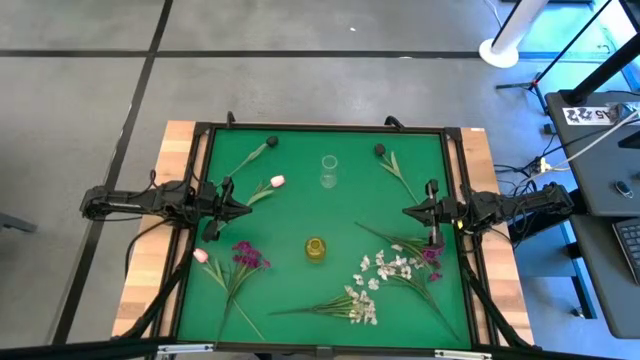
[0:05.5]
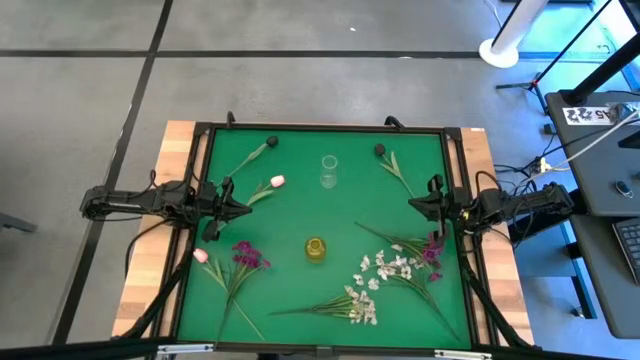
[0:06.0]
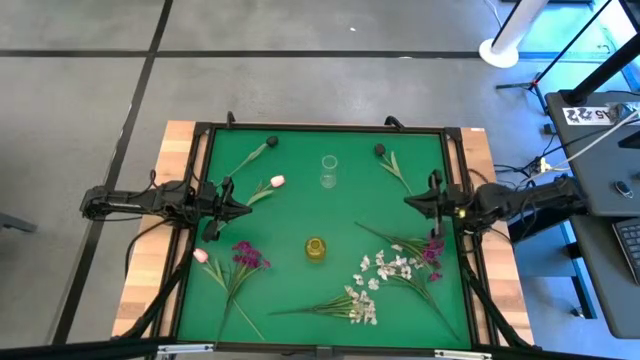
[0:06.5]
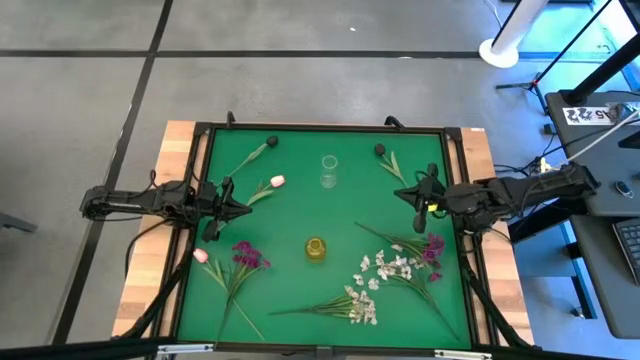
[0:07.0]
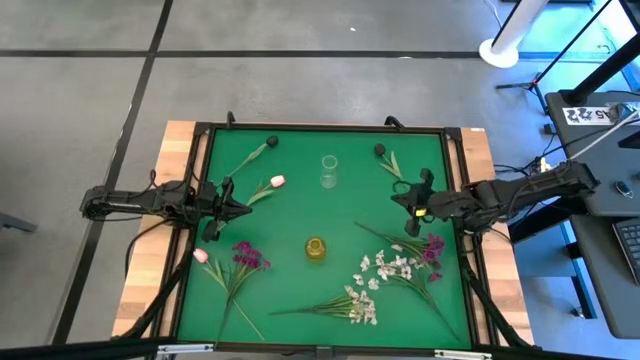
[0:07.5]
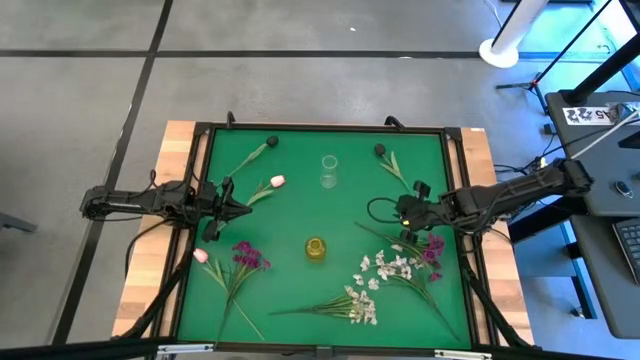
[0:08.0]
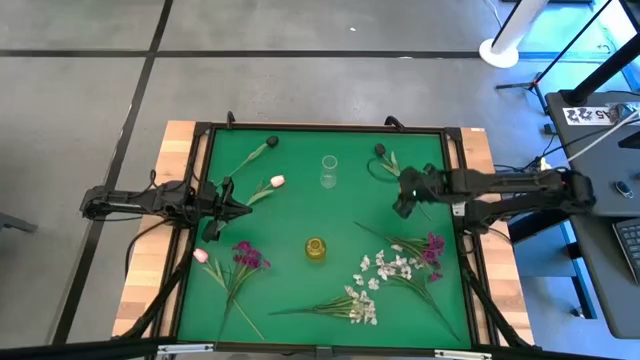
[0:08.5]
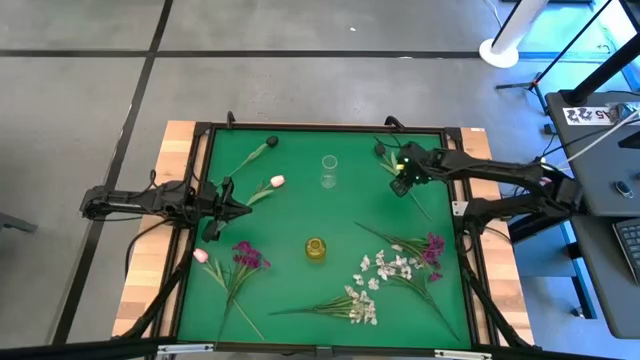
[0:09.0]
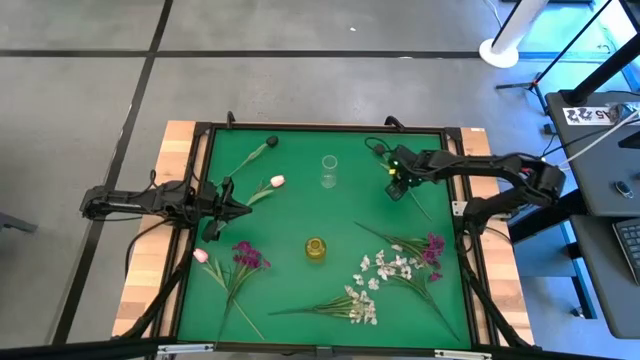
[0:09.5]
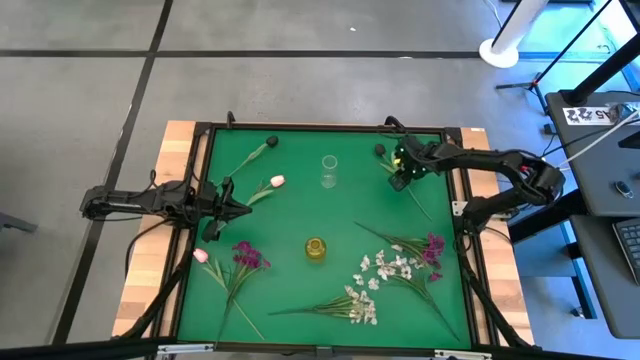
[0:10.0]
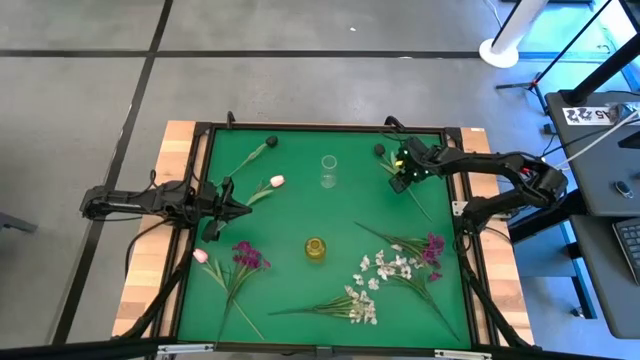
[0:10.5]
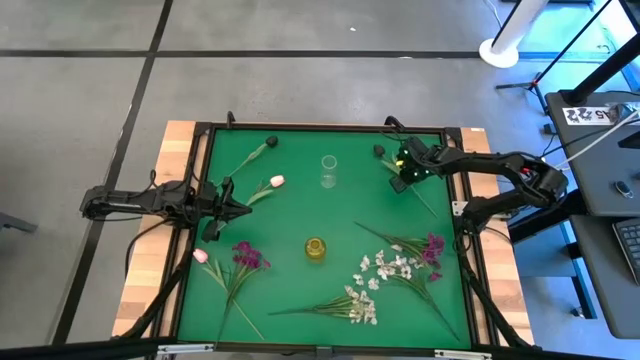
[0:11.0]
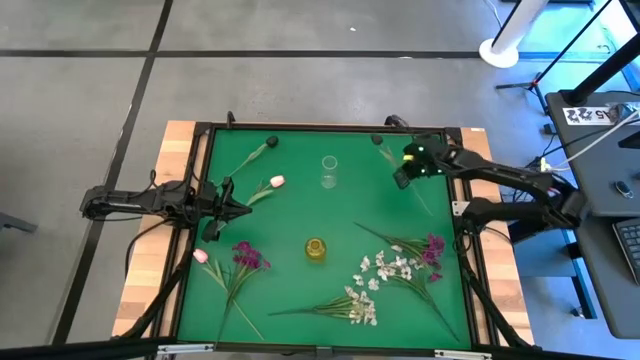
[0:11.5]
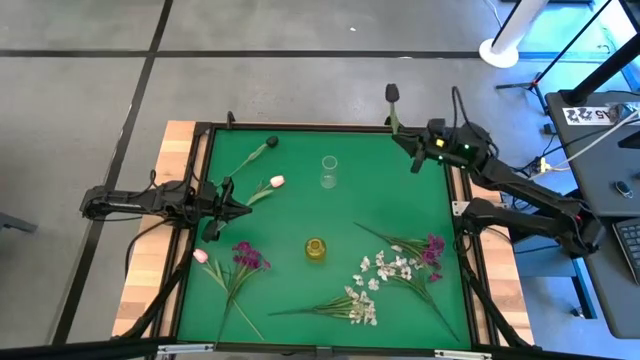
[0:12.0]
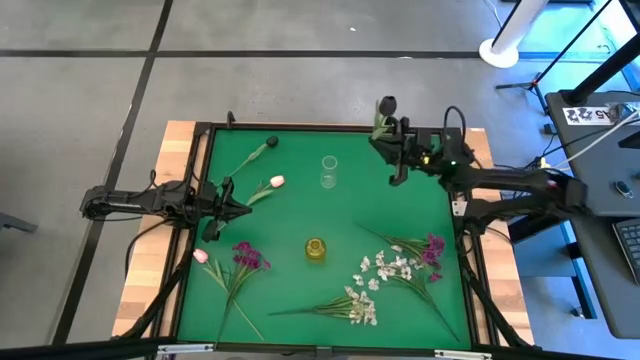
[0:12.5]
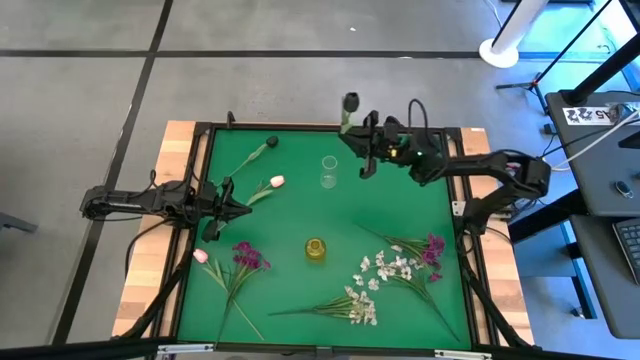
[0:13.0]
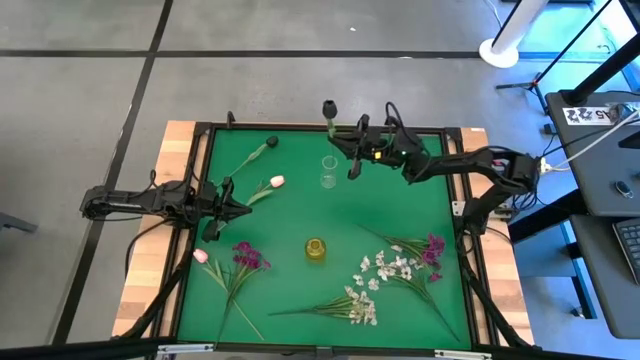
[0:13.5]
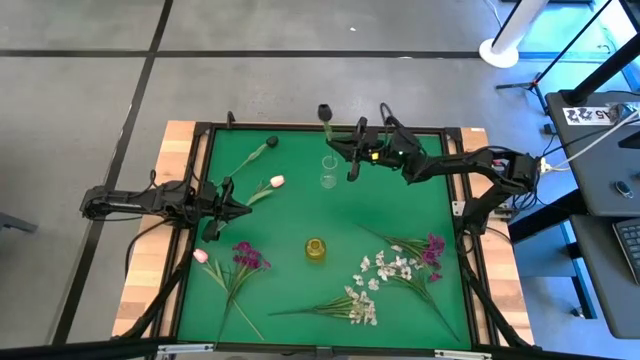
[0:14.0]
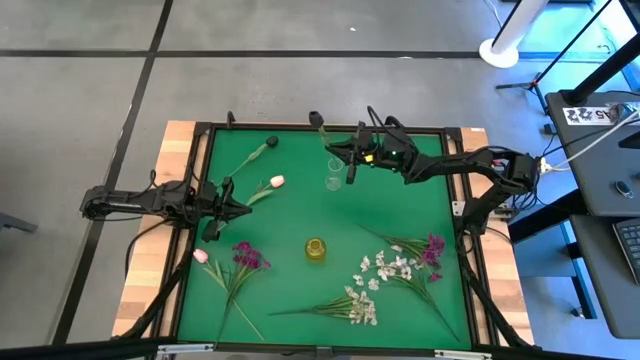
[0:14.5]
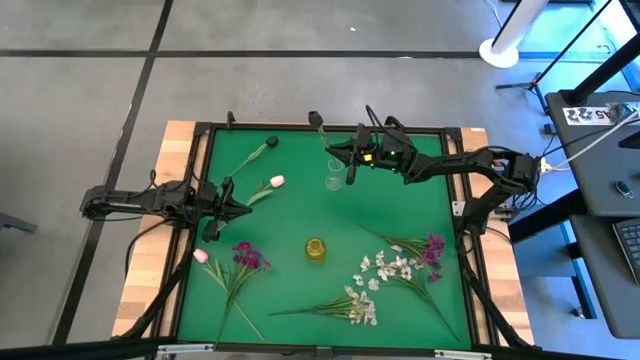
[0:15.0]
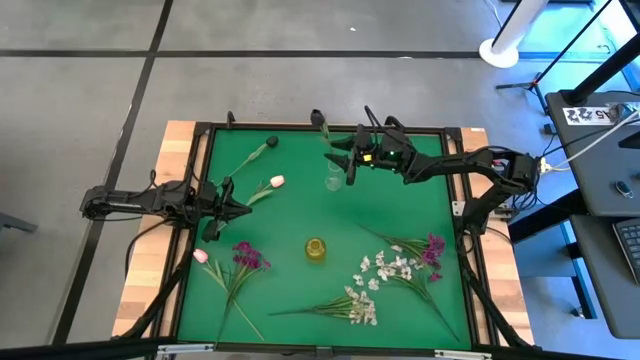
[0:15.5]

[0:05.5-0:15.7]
Task: Sort flowers into vase by color
Put the right black tulip into the transparent vase

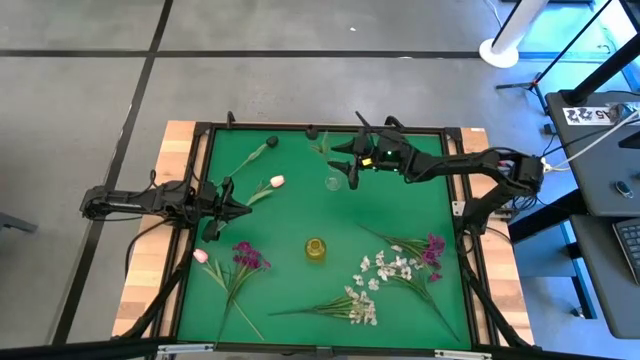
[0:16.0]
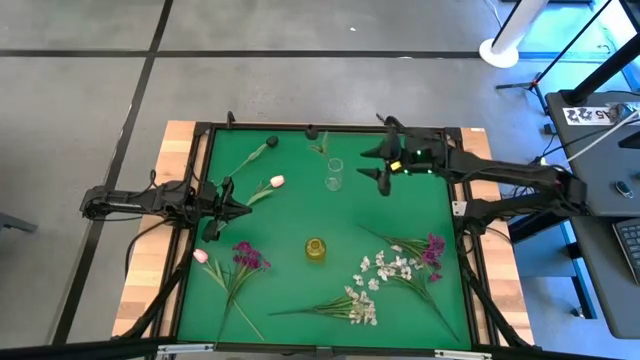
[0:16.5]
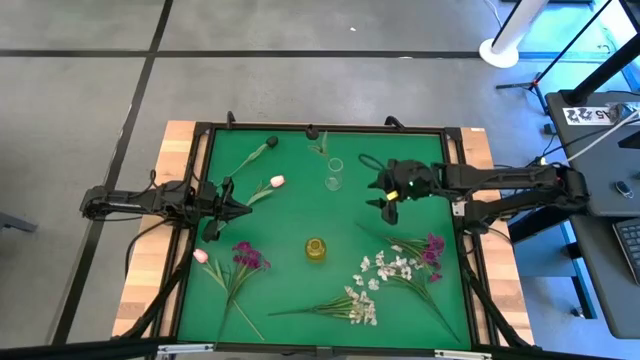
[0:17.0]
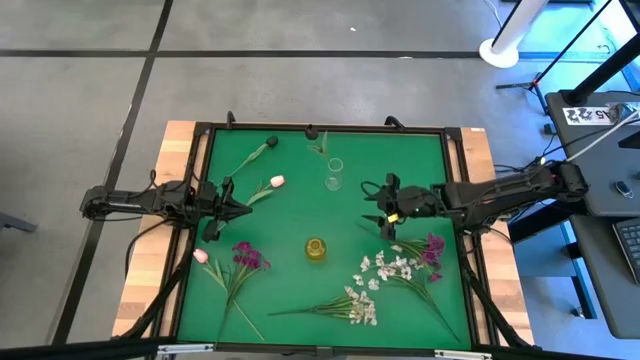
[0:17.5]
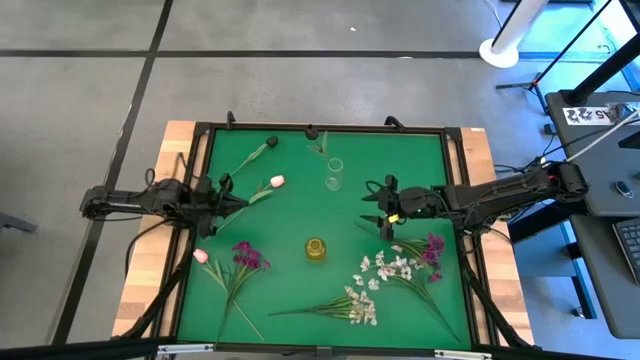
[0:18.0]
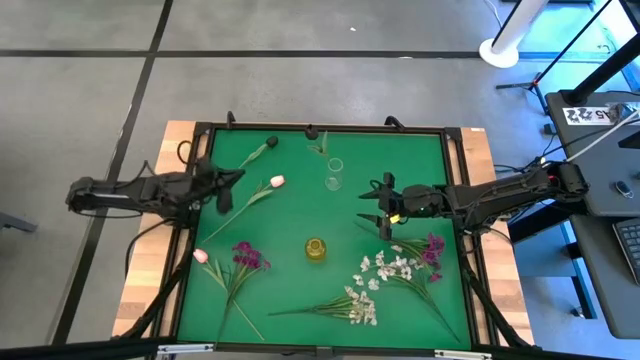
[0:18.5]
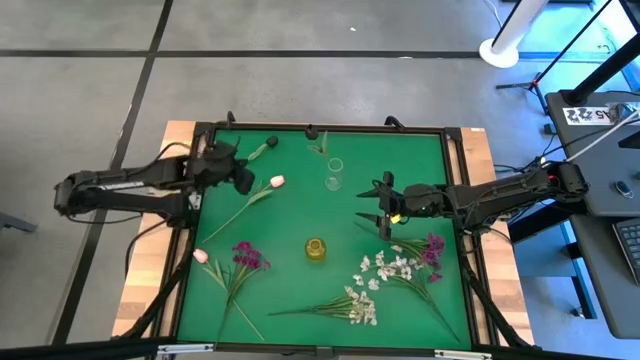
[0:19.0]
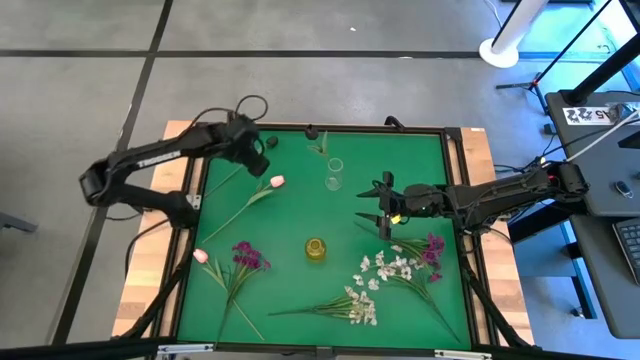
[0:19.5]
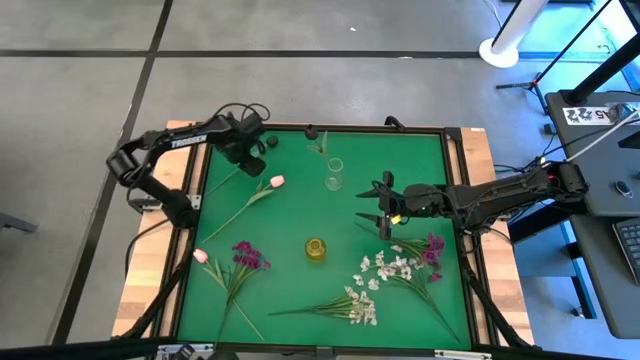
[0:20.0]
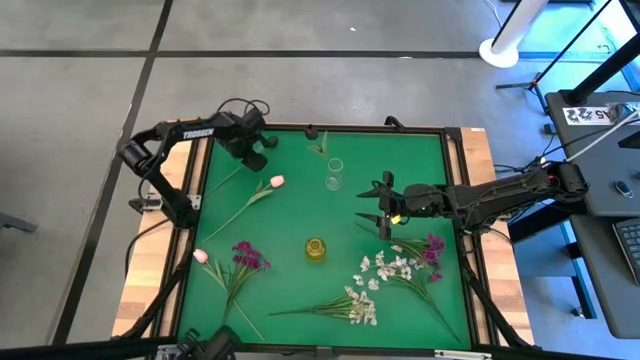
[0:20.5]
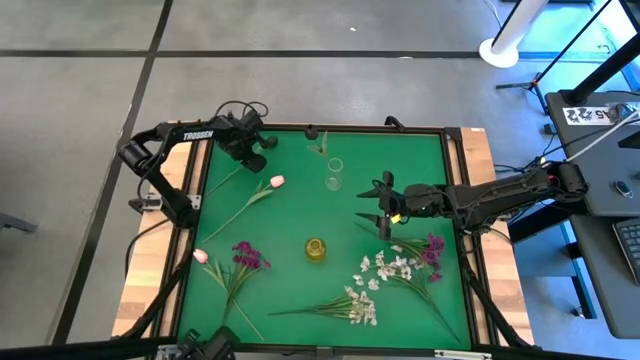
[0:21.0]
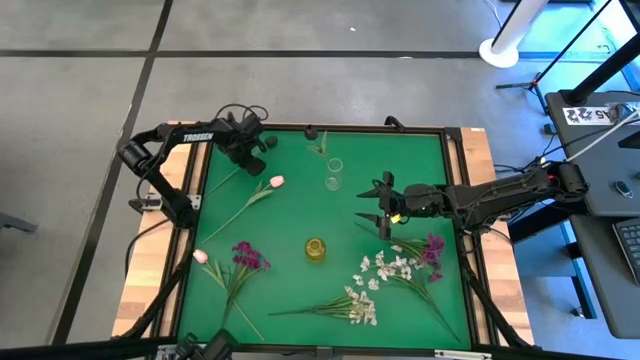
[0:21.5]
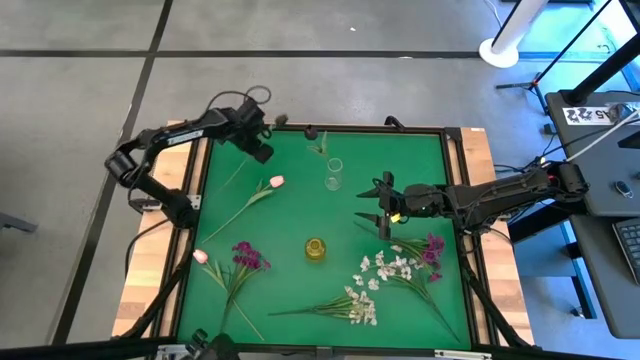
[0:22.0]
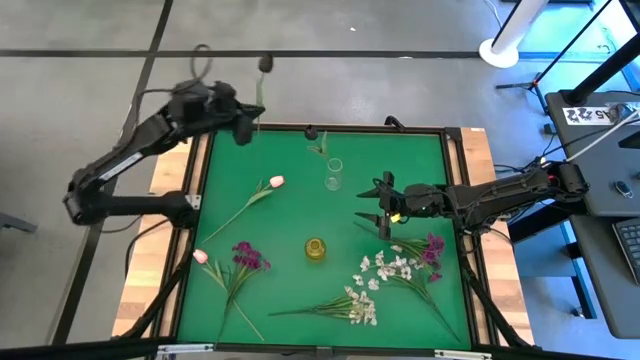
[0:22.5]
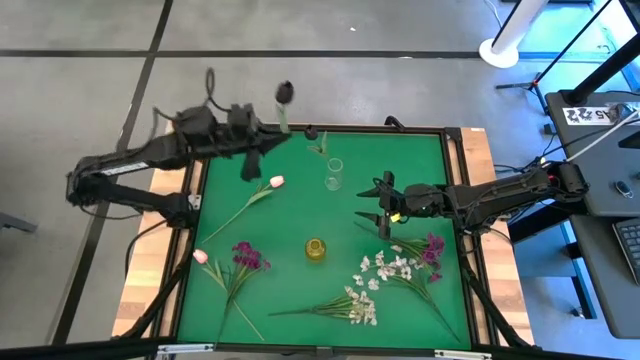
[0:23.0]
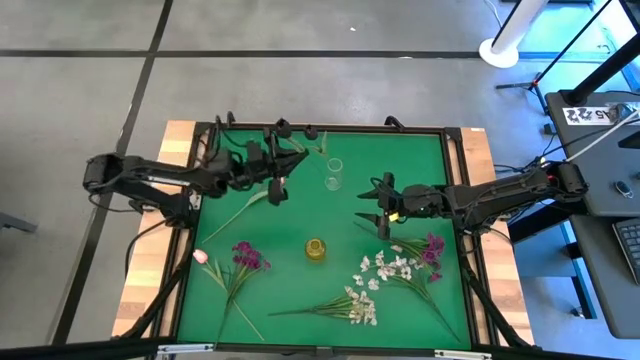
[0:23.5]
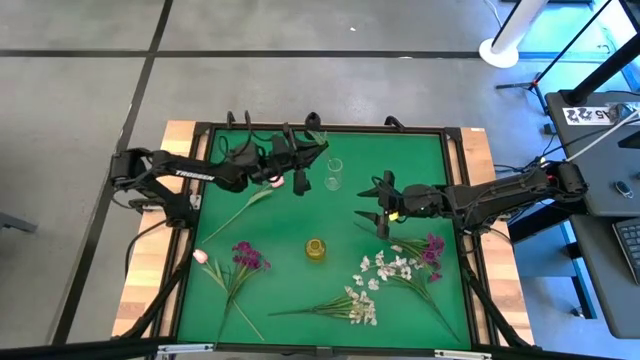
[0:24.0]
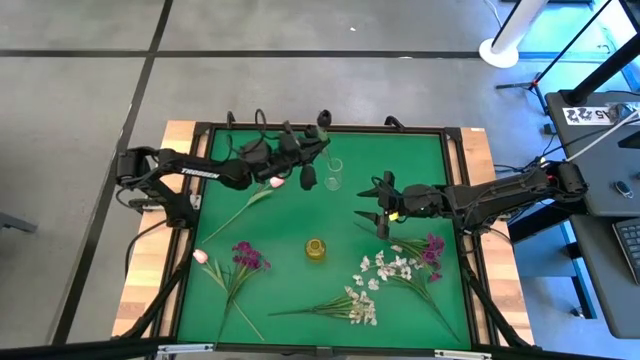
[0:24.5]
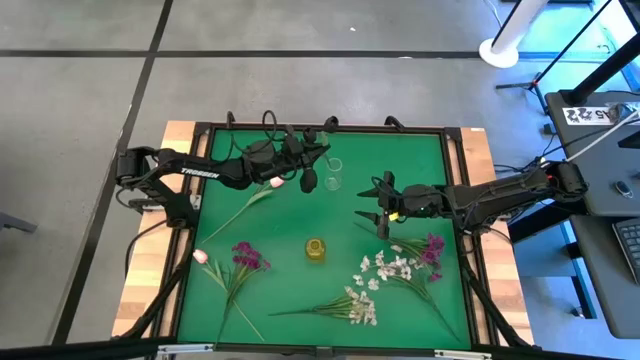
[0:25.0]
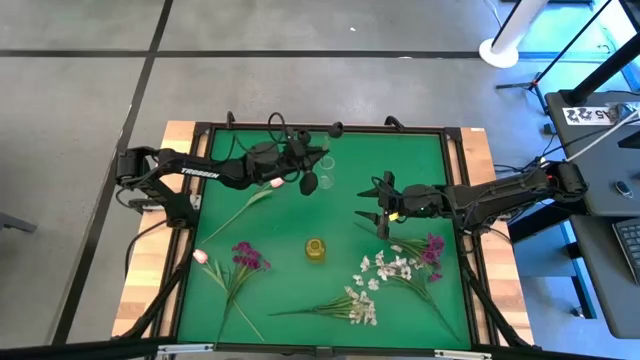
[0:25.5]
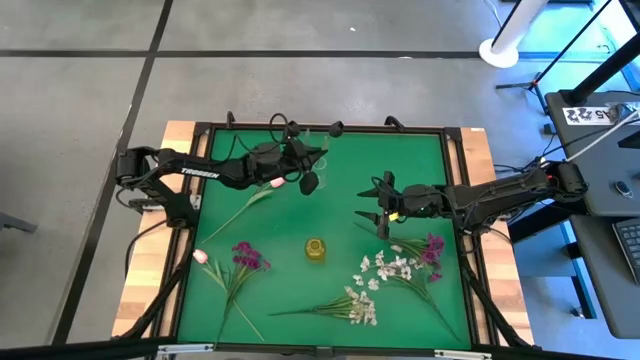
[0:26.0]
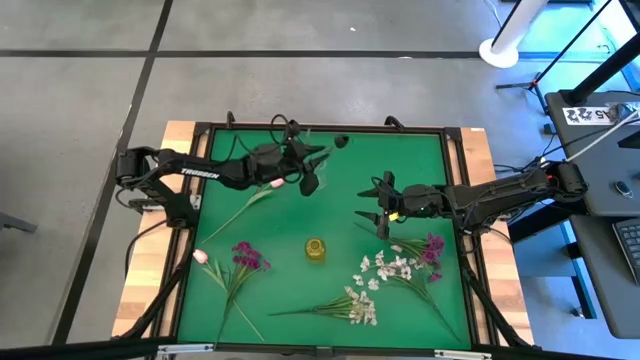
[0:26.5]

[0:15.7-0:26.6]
Put the black tulip into the transparent vase
